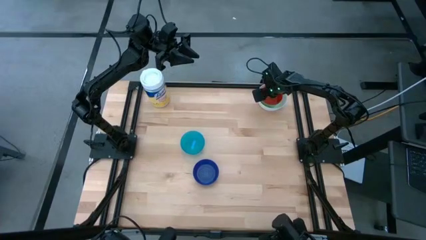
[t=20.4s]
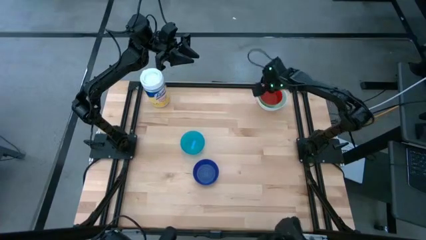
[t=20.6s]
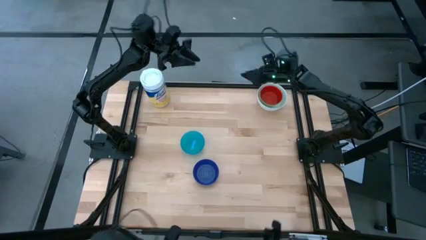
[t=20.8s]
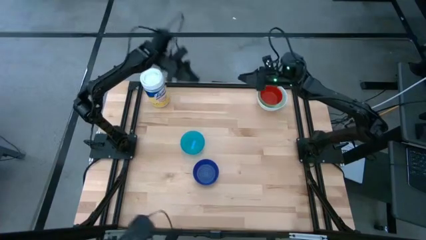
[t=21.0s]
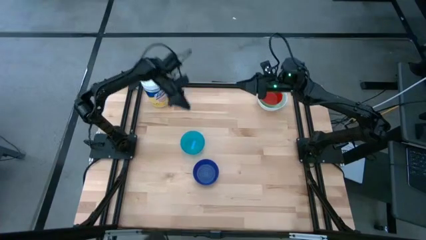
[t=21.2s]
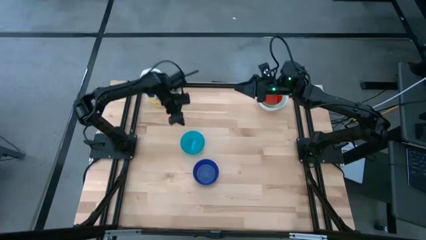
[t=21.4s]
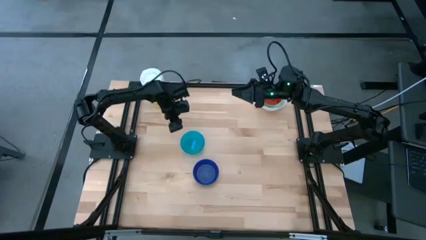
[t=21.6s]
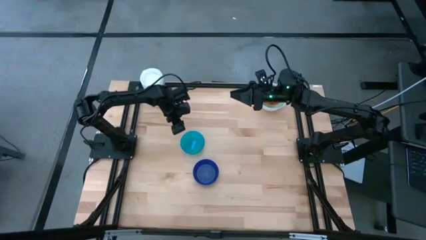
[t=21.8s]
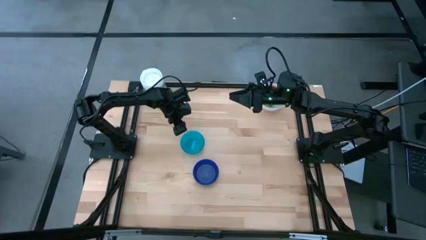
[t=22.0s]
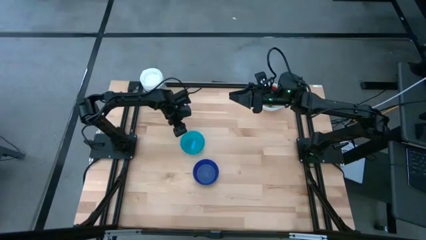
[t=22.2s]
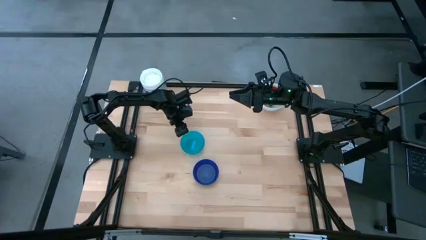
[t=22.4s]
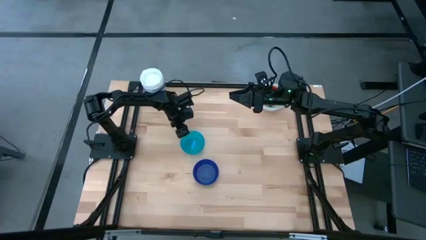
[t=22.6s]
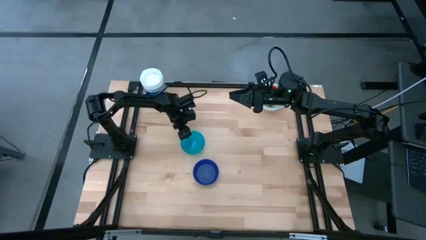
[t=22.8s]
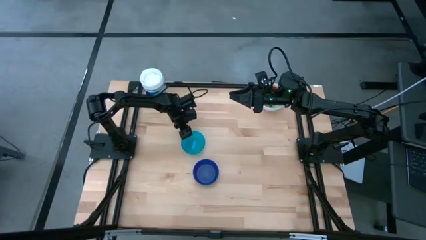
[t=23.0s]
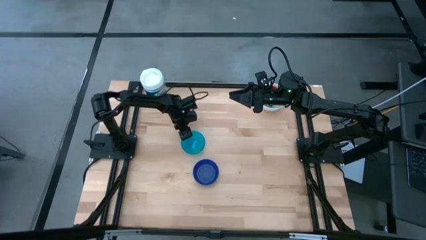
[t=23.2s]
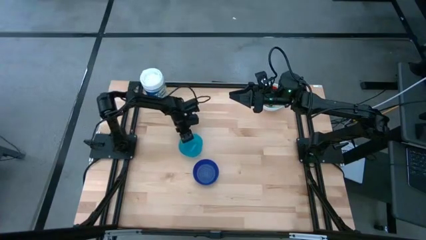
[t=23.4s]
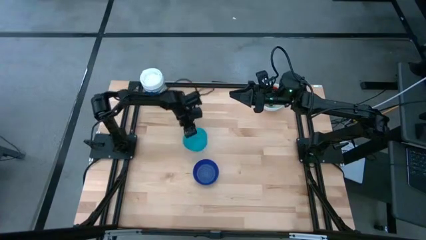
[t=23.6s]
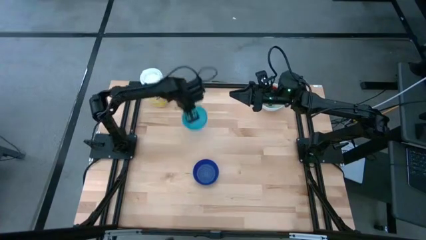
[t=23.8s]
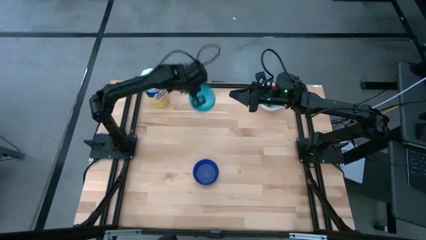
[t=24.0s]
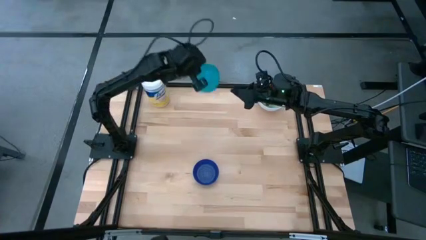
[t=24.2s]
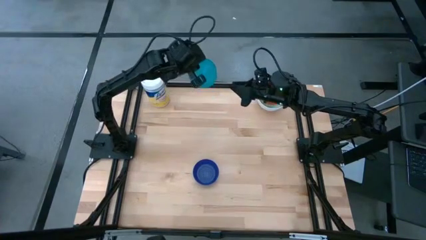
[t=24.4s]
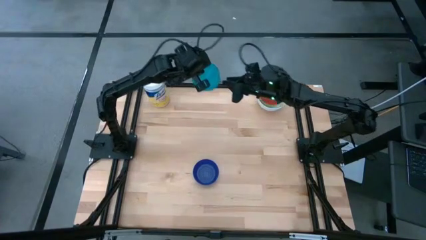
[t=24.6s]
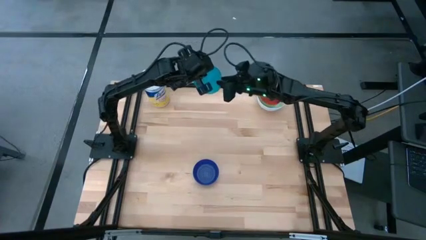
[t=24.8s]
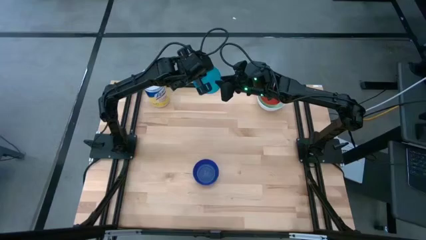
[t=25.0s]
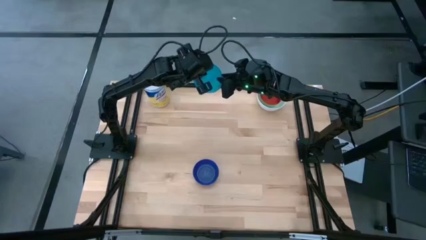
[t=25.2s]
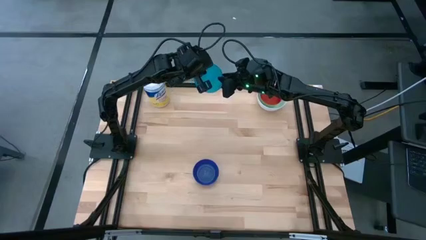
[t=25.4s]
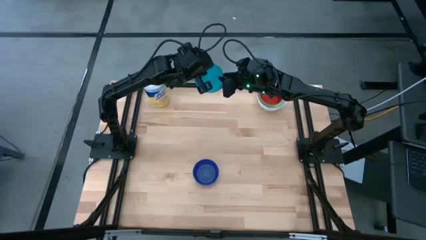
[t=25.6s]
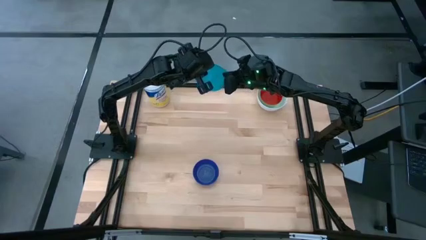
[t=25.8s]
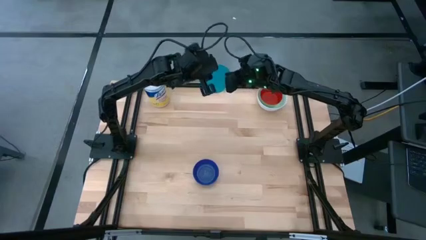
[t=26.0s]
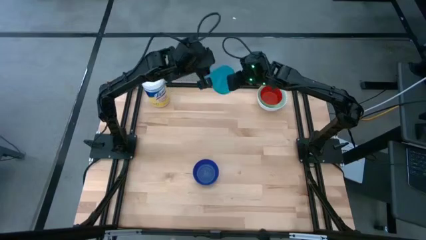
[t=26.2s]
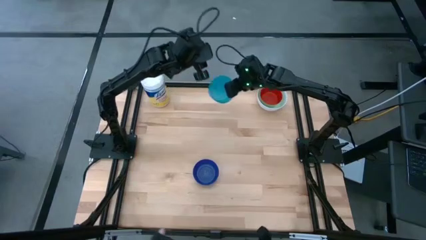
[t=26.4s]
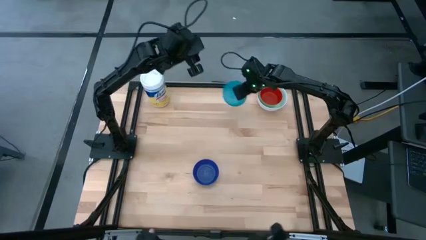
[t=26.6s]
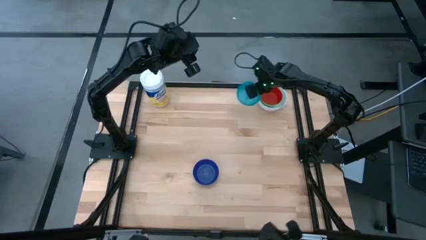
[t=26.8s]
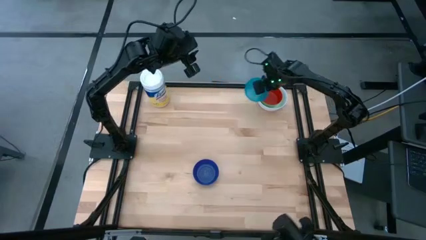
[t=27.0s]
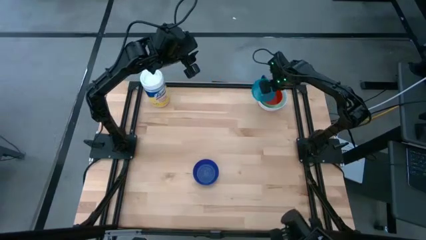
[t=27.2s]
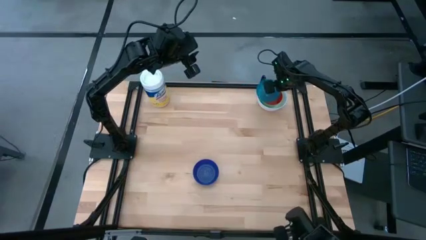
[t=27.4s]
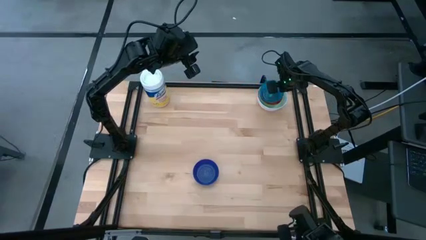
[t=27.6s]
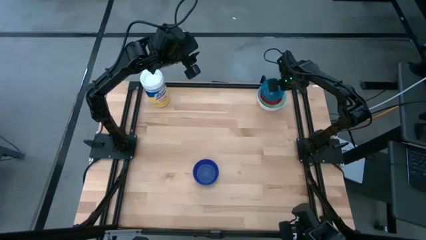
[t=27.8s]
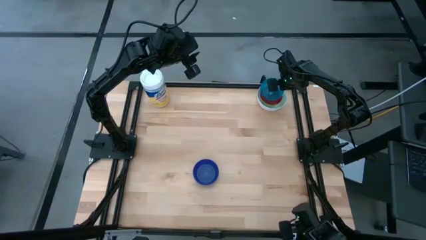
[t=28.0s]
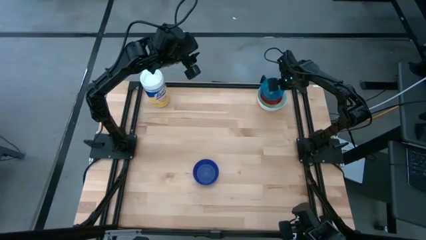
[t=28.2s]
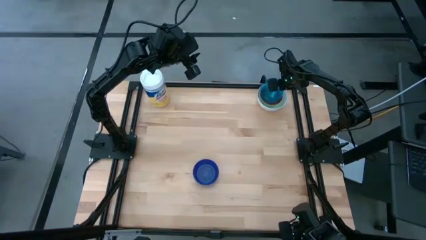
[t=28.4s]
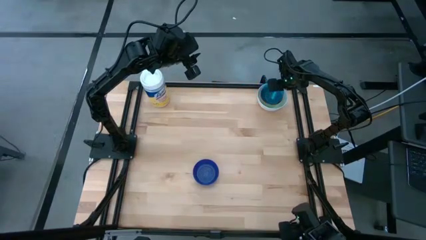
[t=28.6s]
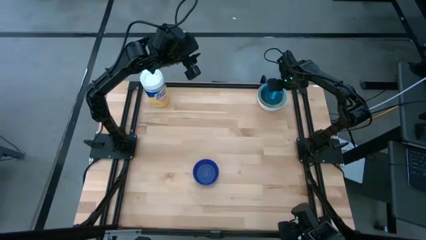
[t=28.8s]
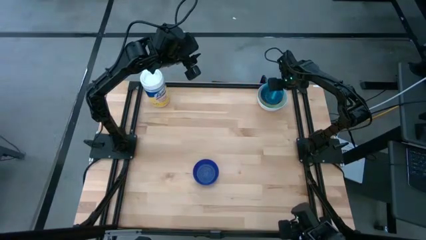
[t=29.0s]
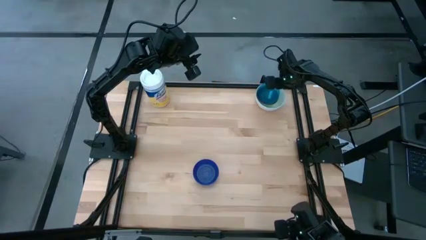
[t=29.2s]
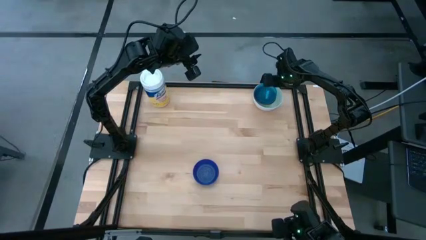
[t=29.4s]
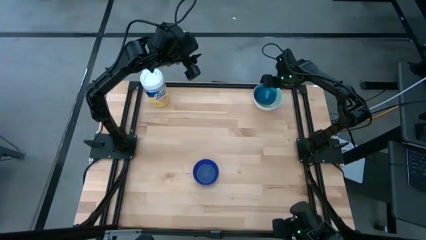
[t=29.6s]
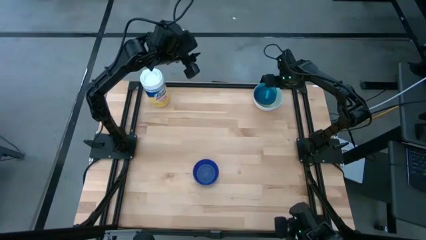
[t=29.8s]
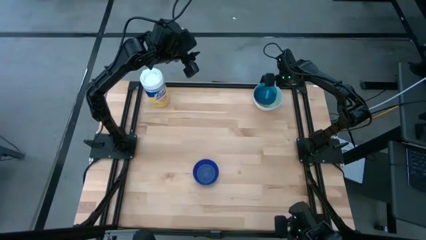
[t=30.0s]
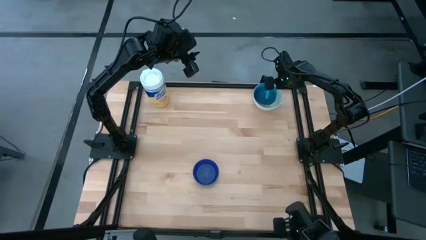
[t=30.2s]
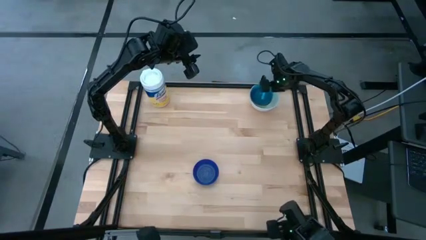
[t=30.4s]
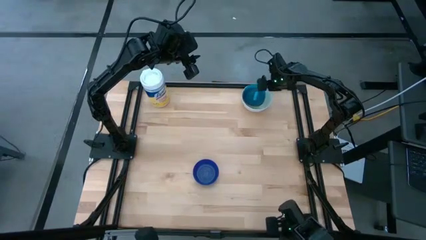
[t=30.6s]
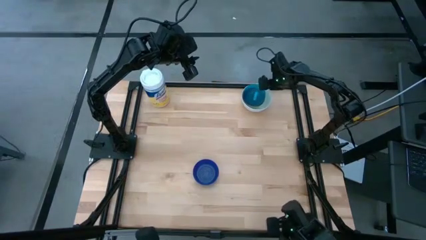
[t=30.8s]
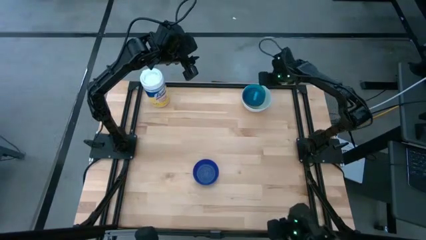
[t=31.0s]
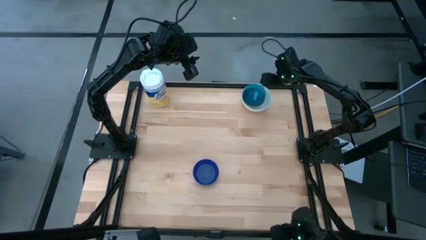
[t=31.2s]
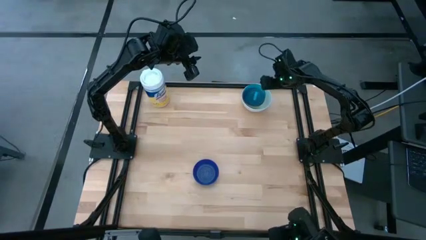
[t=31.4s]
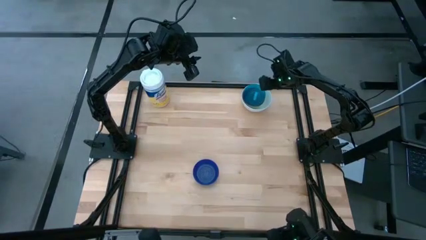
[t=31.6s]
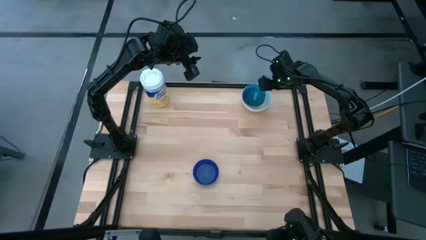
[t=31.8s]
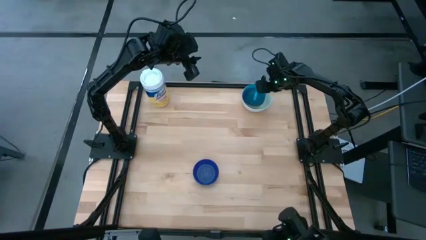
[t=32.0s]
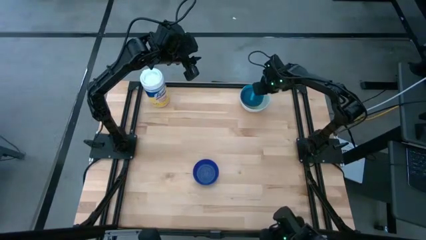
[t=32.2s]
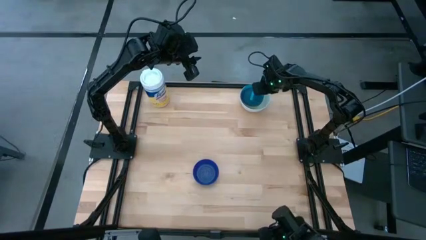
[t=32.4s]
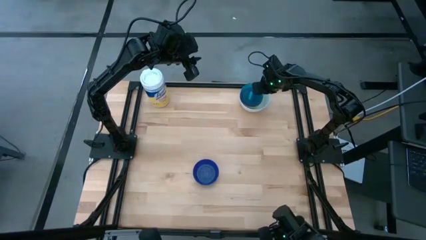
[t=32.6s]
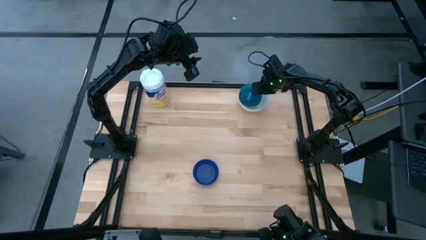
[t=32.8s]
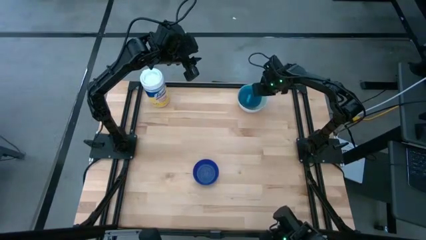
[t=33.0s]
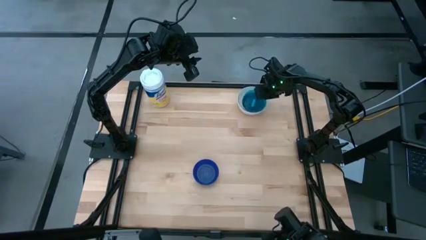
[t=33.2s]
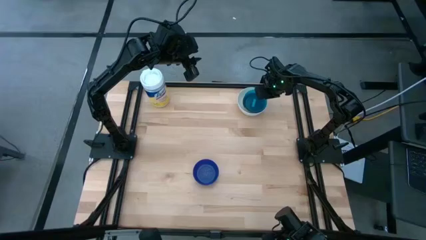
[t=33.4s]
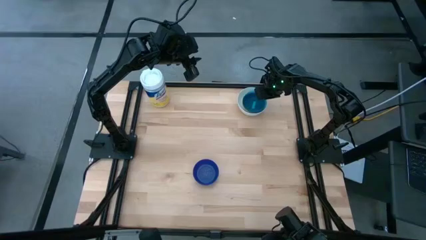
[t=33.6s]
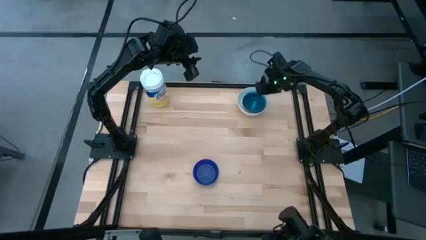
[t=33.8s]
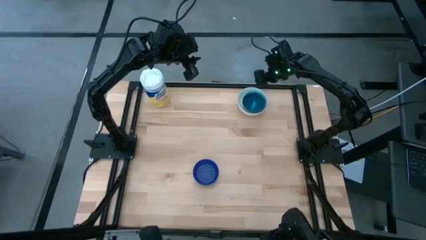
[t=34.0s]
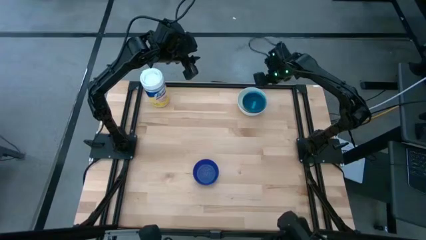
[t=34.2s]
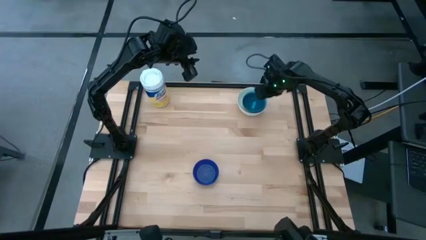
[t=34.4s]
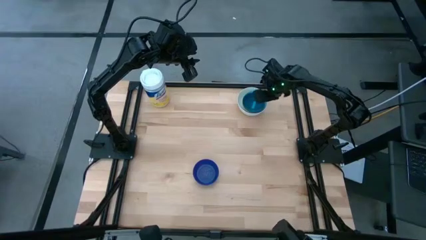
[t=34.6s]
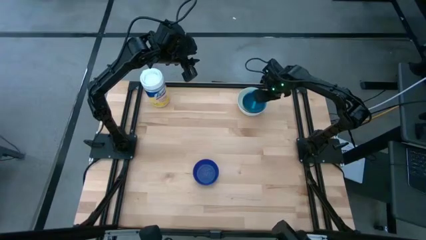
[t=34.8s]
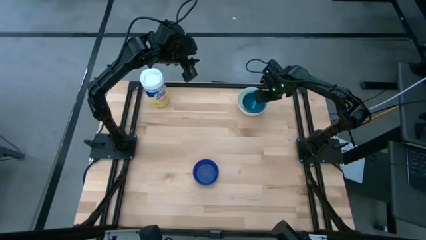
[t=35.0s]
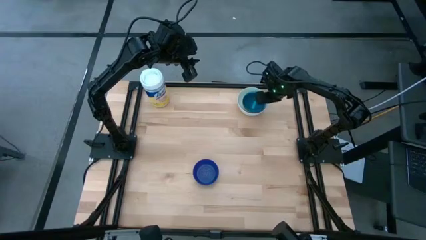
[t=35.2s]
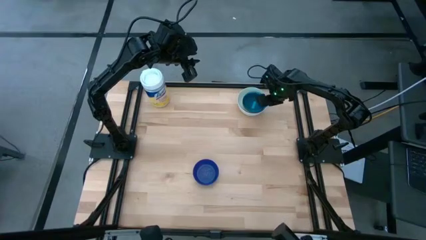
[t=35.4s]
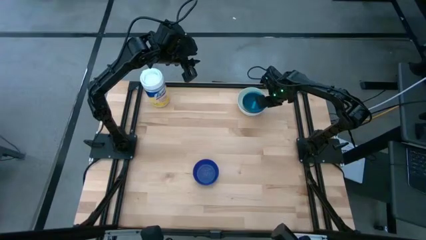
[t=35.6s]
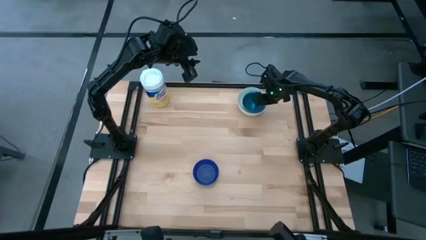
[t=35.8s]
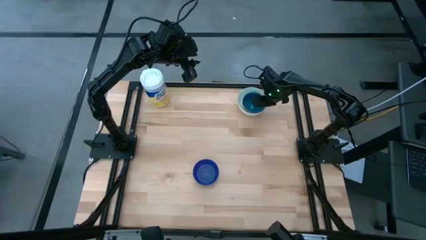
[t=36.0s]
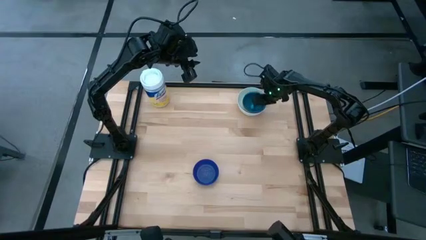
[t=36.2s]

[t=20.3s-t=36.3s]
Stack the light blue bowl on the red bowl
